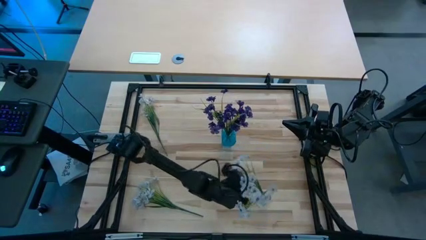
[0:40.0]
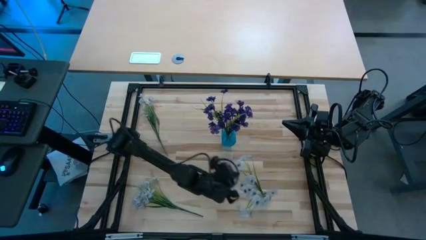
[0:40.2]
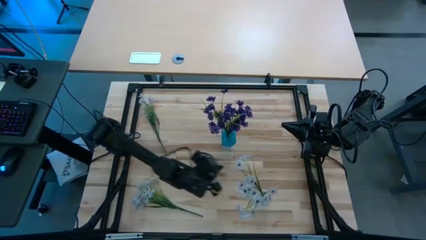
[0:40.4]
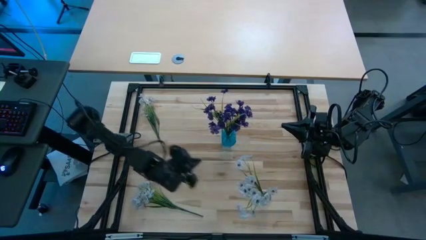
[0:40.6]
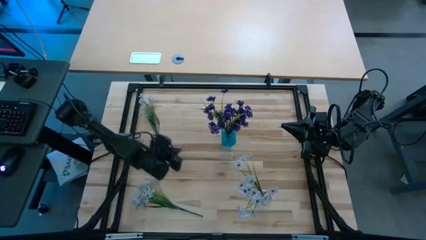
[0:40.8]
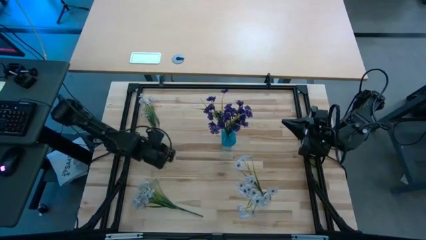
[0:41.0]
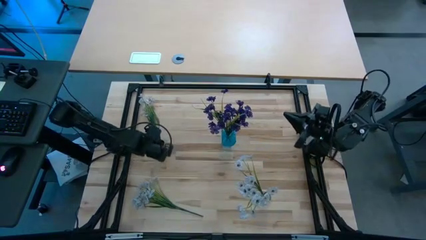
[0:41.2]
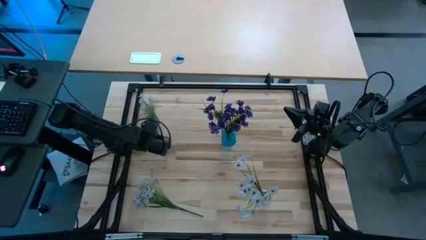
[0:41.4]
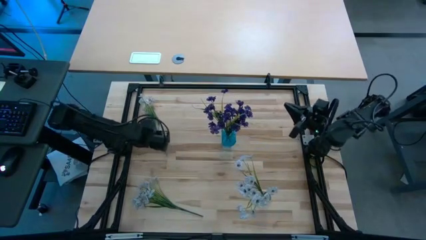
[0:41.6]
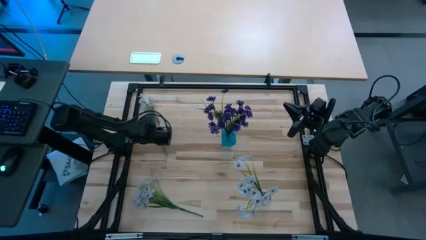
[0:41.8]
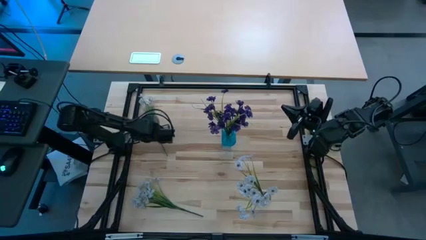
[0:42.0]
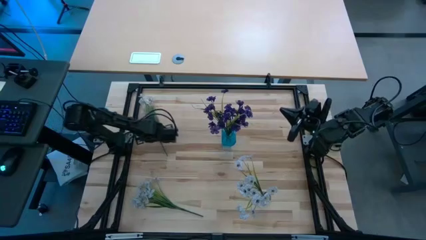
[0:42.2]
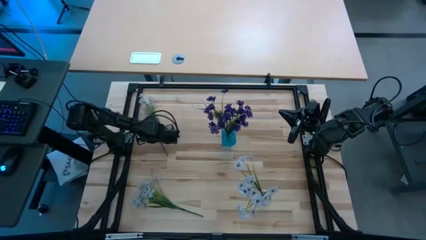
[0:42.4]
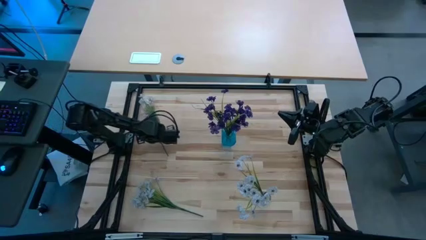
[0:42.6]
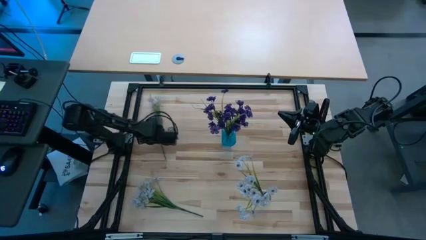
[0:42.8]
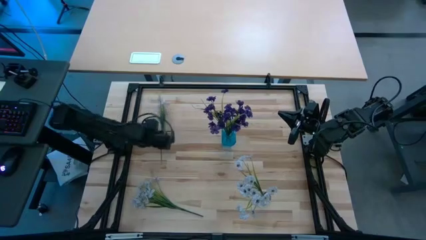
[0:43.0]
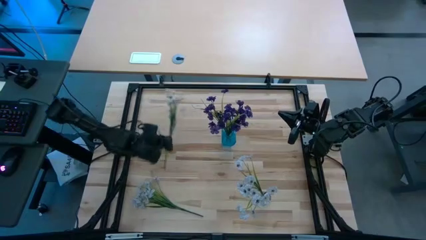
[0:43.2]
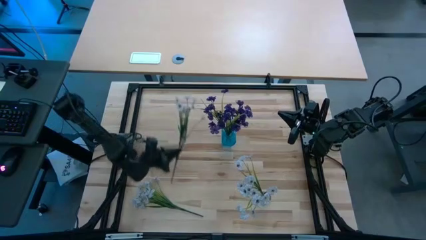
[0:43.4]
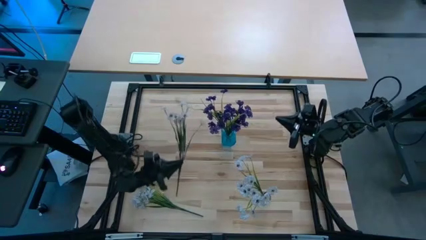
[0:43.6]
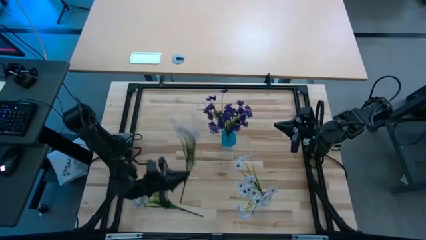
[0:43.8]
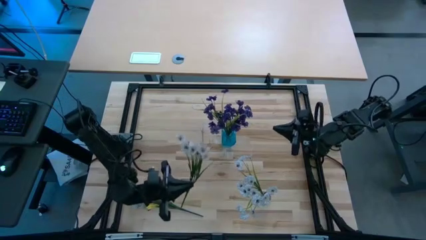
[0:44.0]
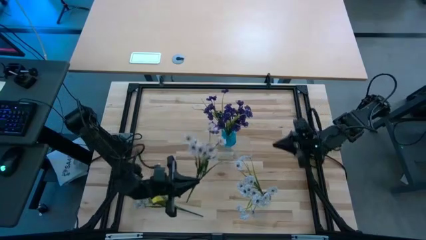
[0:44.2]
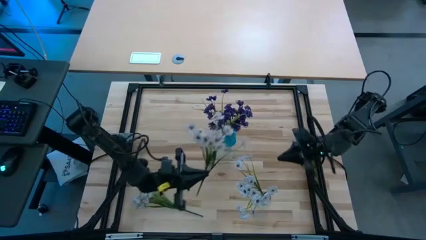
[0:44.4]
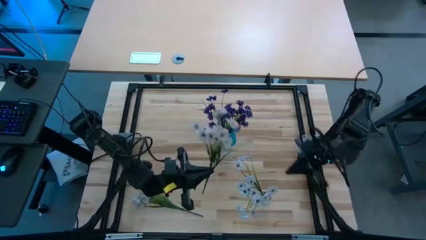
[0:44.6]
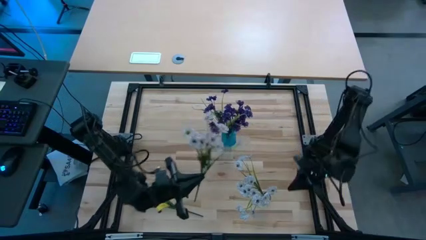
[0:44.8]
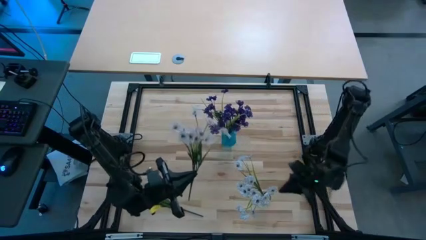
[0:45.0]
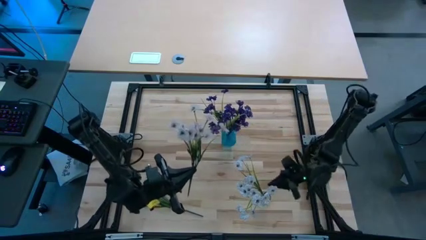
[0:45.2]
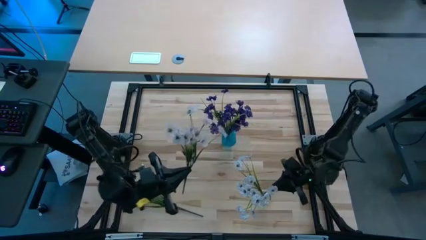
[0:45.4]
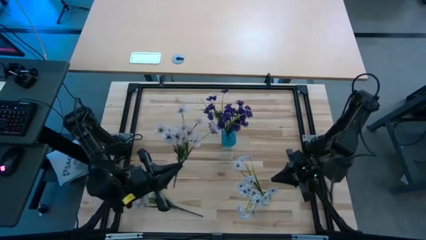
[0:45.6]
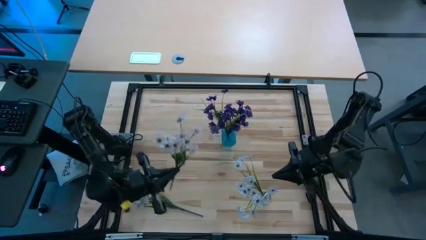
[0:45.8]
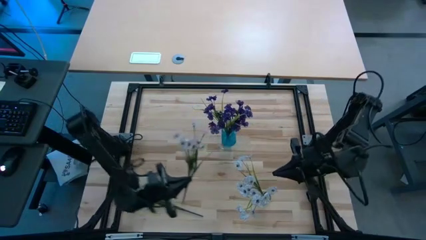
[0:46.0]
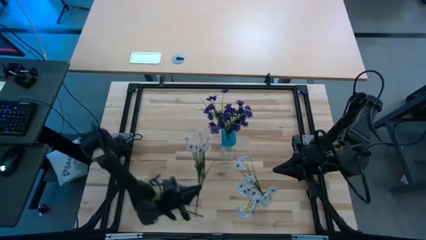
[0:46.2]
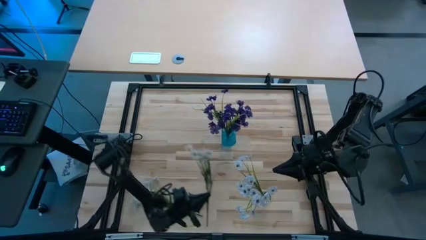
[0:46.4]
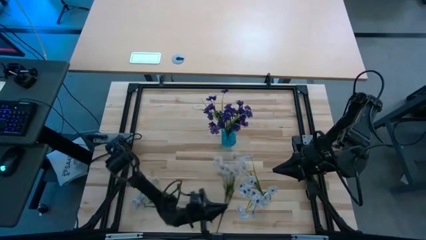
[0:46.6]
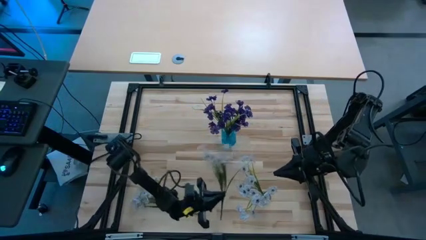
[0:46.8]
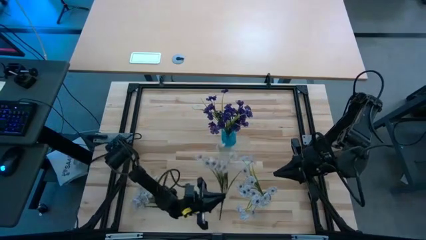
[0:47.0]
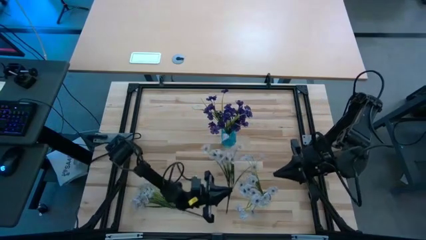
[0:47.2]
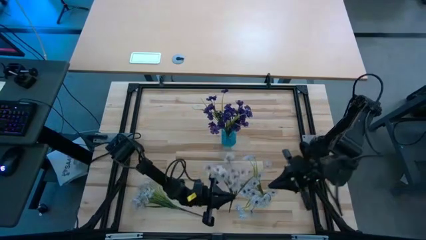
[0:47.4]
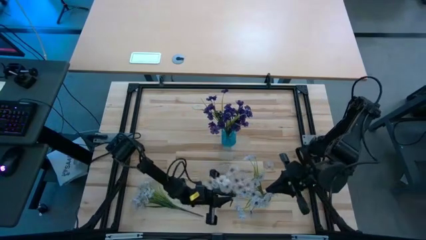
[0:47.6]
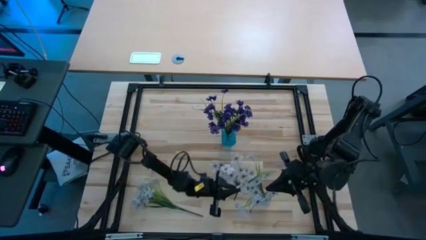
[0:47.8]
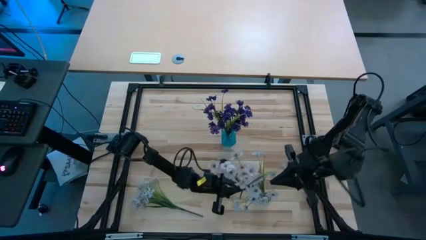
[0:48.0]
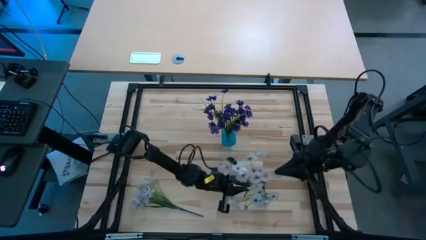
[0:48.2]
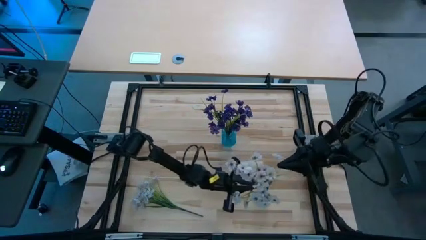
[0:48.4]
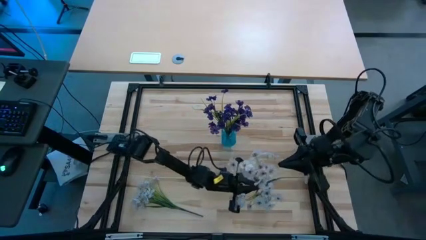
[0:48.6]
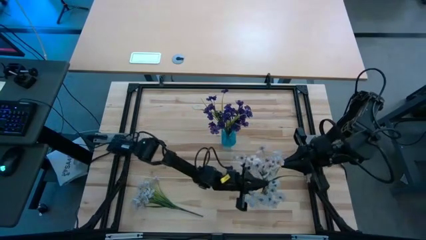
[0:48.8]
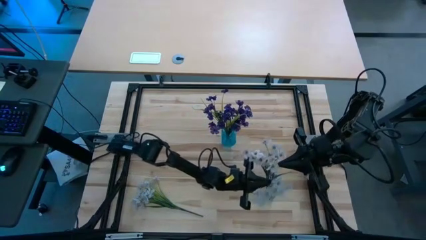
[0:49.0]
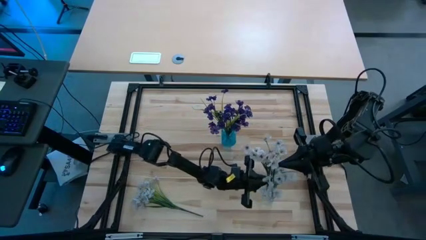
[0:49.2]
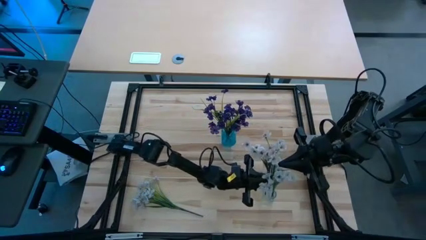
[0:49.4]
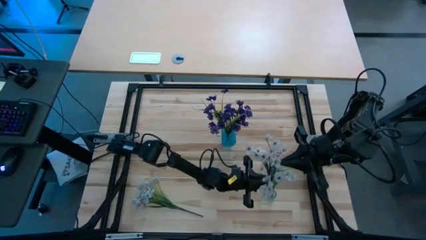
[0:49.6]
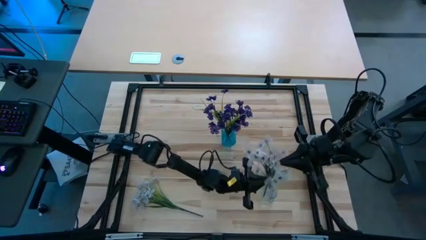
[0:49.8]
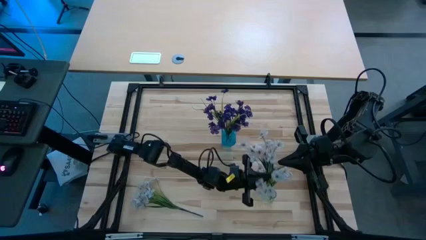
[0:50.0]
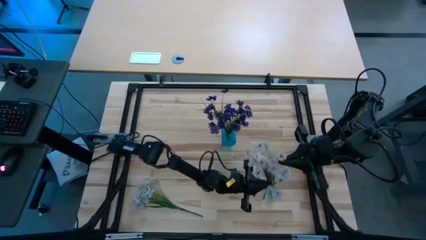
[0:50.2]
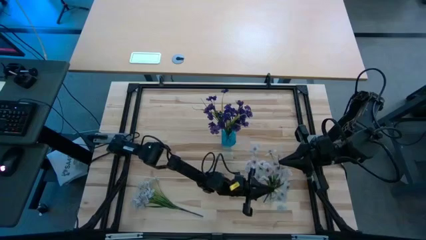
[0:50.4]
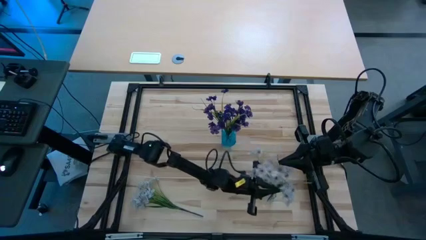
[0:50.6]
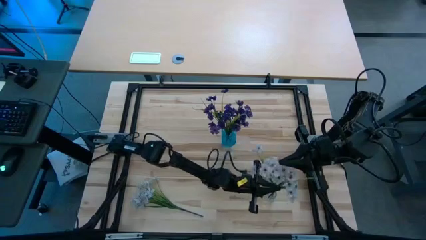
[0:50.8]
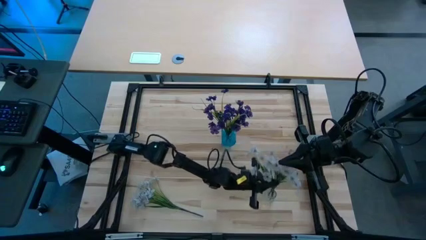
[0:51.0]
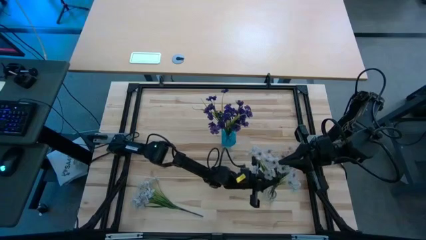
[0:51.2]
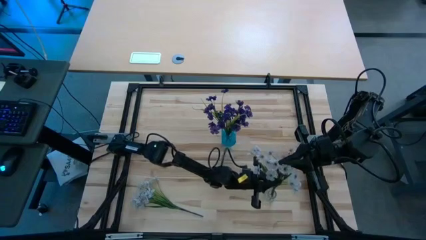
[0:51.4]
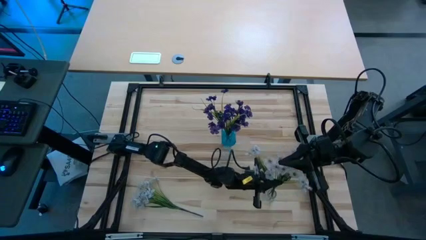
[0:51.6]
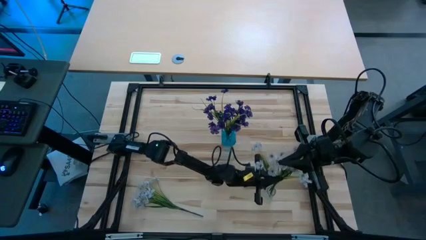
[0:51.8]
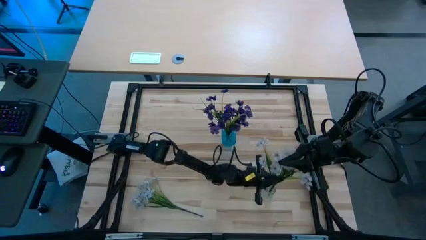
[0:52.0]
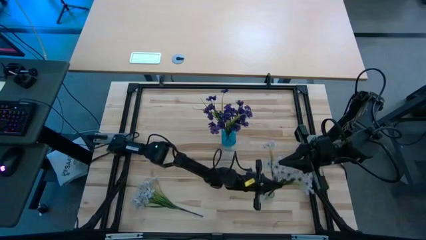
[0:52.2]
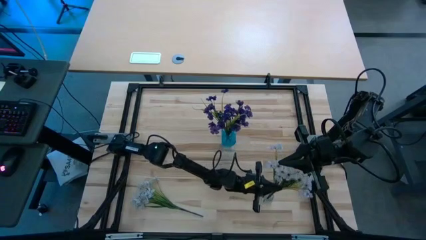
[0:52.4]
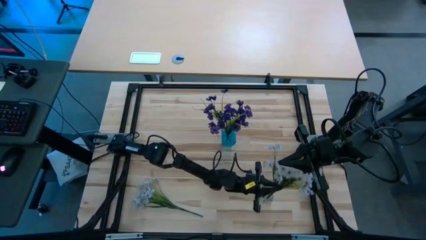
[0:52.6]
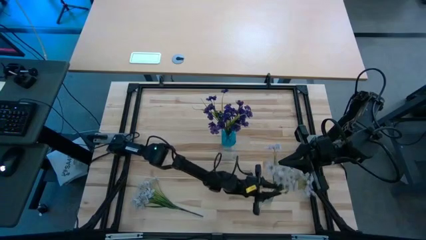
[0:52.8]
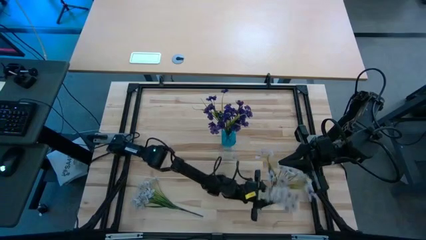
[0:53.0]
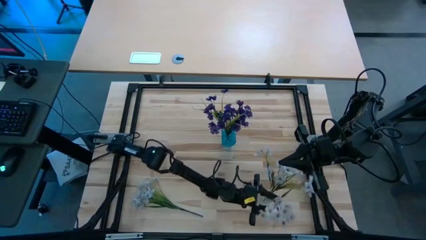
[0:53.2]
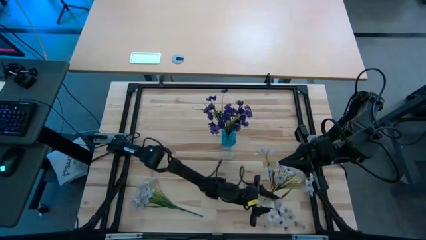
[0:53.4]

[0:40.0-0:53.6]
Task: Sort flowers into vase by color
Put the top white flowers into the transparent crystal vase
